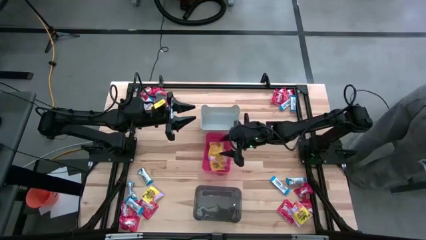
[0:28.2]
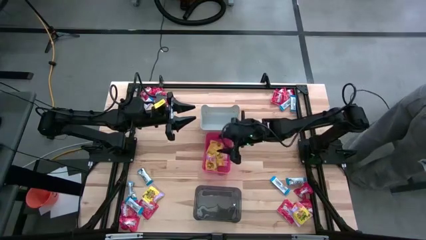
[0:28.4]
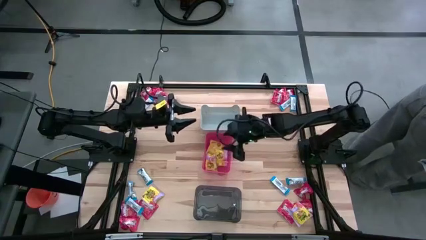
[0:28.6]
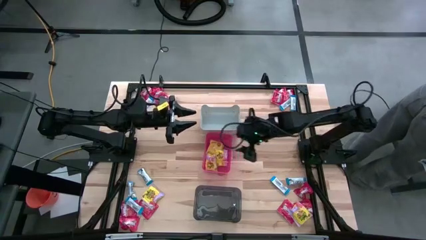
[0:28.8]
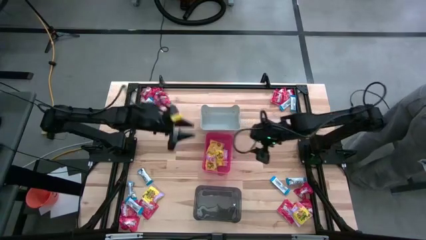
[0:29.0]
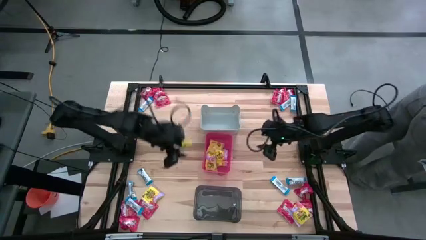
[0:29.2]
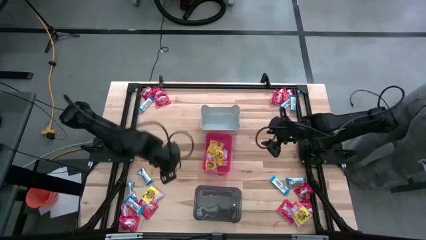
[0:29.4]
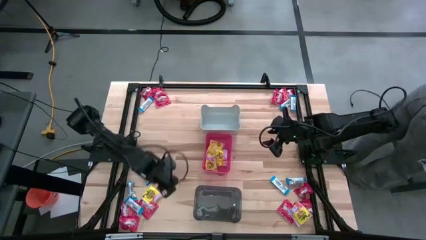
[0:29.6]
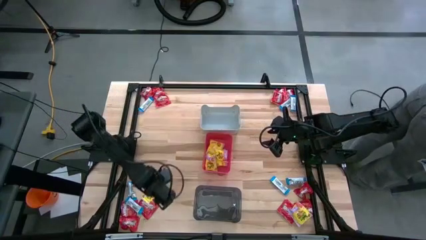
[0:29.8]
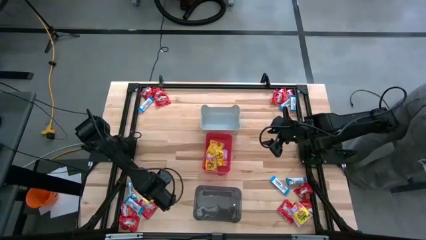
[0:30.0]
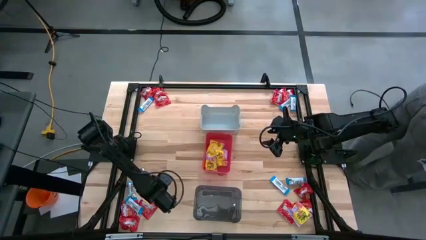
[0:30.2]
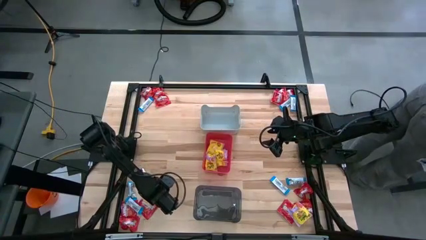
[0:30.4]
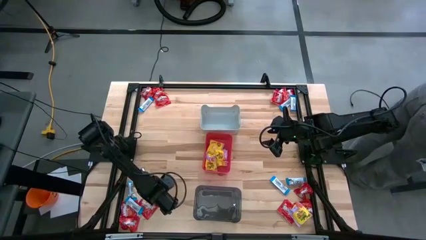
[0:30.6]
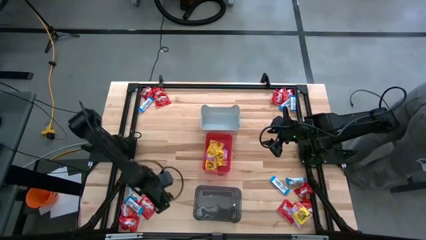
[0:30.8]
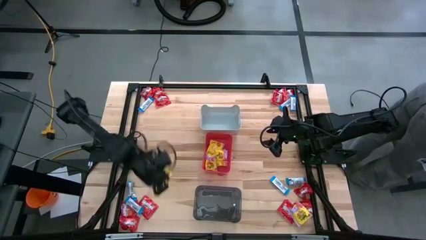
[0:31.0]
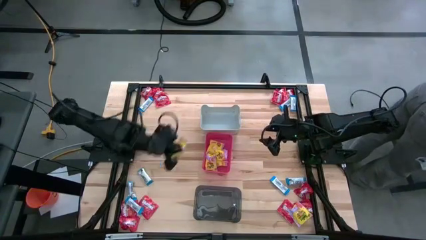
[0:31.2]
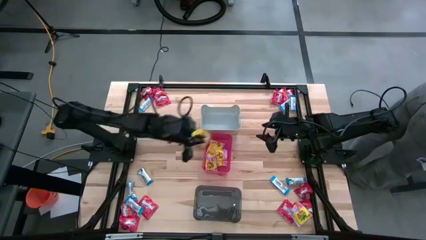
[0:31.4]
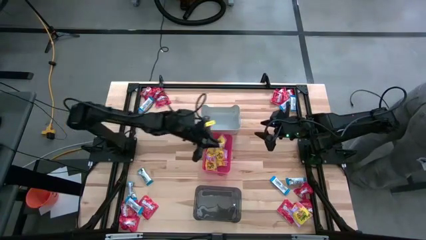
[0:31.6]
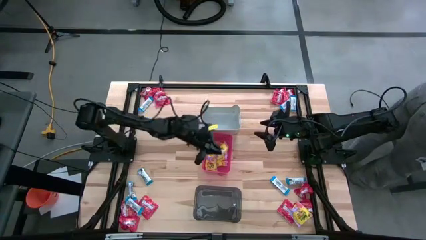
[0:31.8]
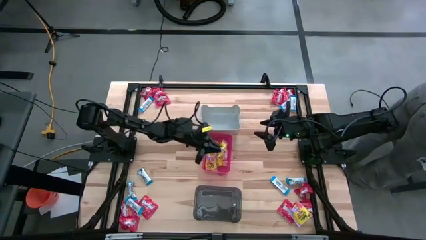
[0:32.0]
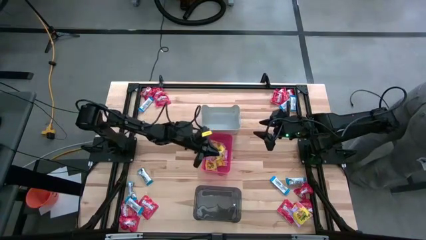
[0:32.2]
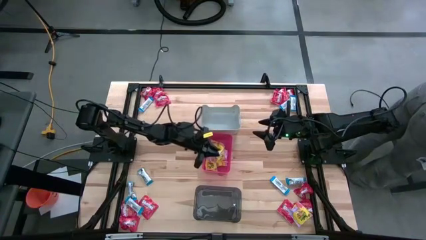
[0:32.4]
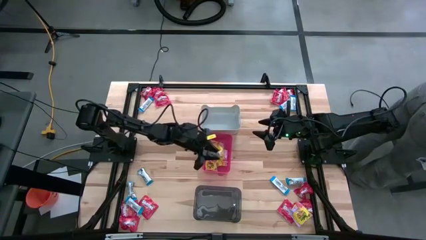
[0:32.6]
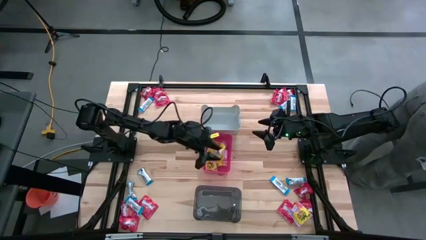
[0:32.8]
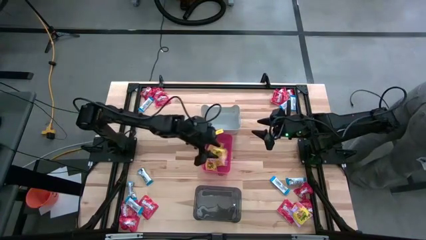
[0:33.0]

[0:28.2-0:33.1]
Task: Sort candy
Put the yellow candy into the red bin

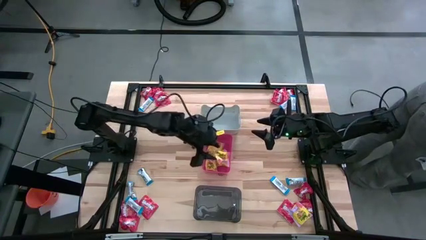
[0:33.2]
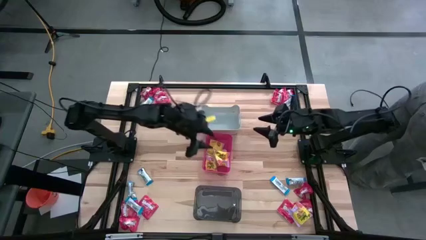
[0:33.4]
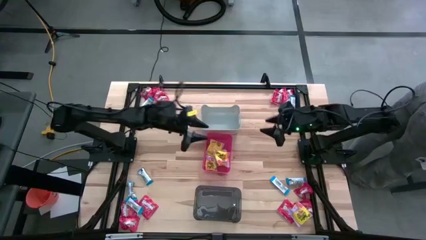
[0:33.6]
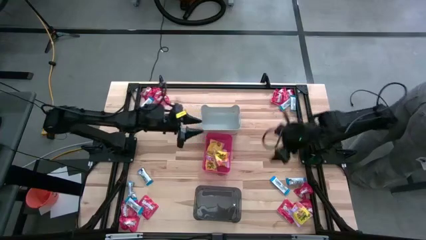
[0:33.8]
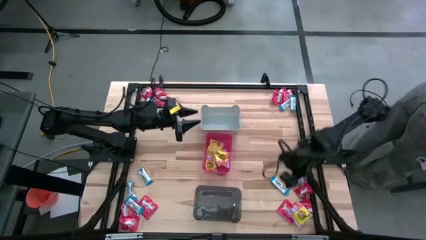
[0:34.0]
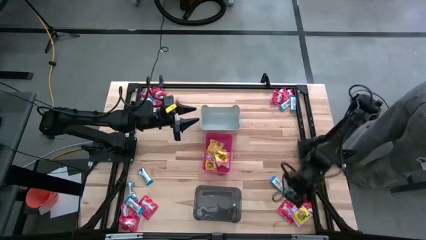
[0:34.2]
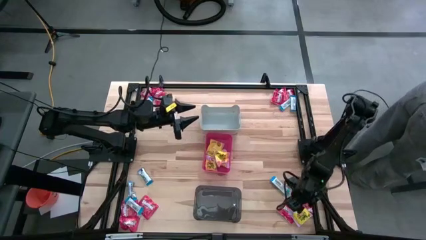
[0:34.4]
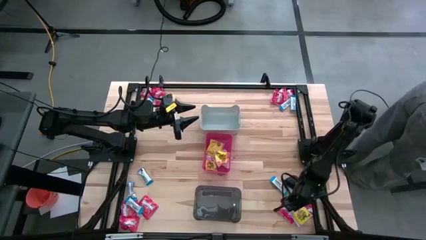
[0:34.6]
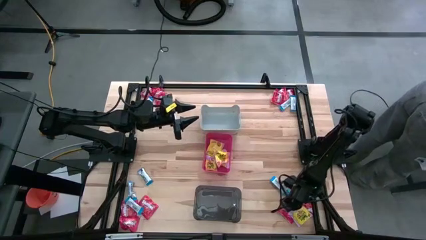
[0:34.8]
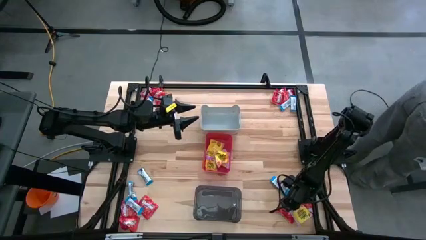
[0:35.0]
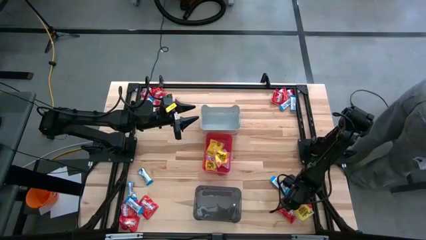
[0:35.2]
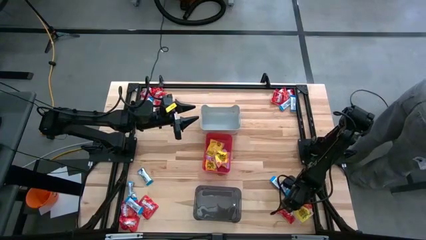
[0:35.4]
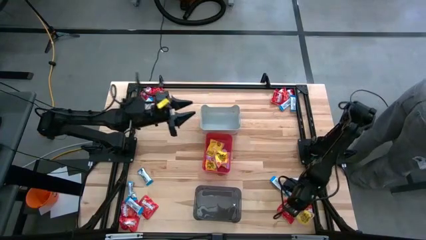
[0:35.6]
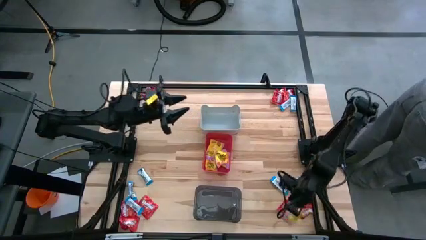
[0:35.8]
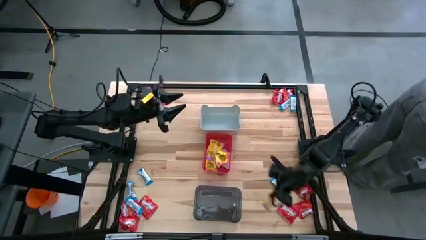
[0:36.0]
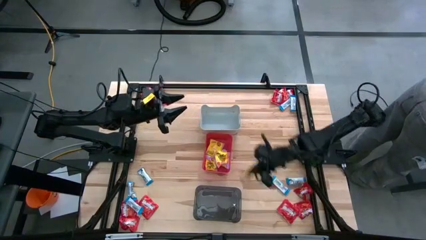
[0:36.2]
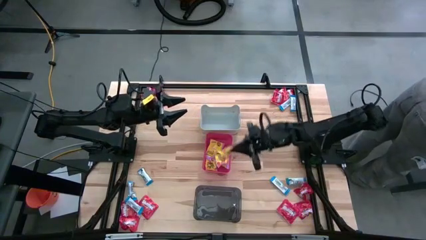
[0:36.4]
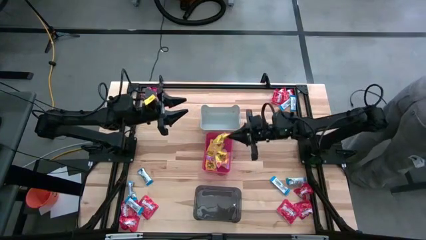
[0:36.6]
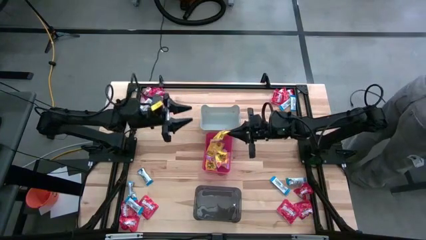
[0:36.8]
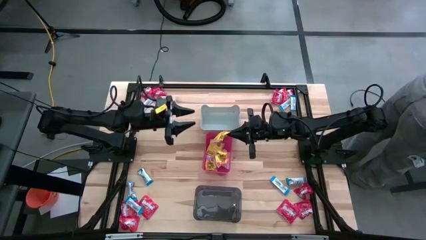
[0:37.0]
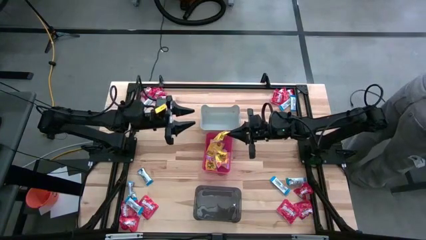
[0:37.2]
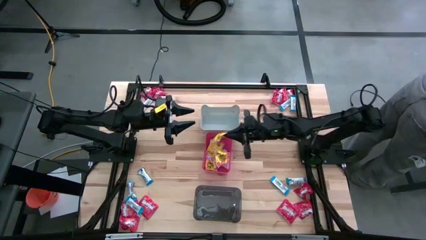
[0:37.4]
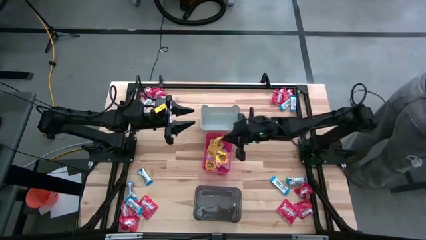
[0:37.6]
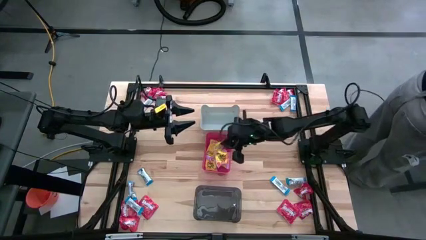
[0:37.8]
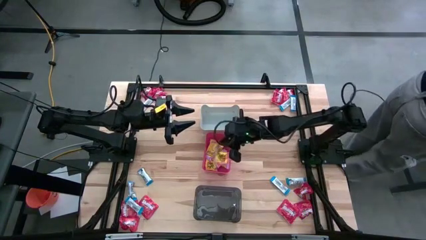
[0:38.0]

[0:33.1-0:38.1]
Put the yellow candy into the red bin

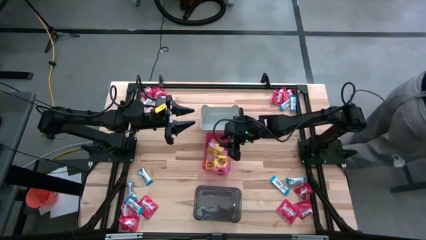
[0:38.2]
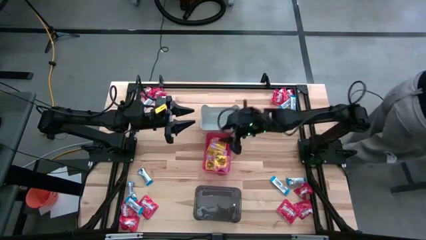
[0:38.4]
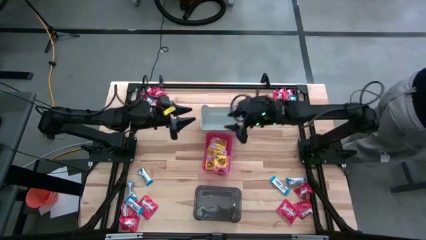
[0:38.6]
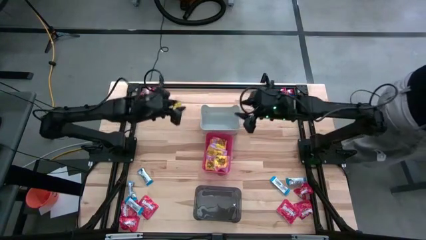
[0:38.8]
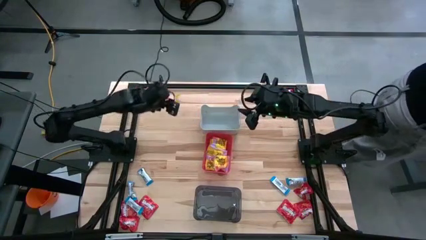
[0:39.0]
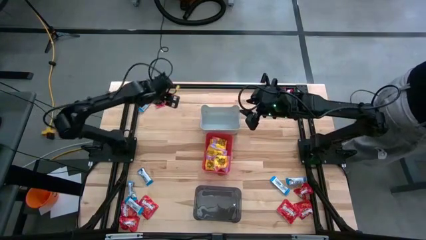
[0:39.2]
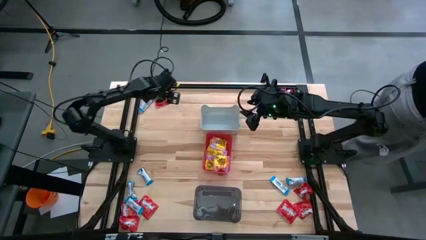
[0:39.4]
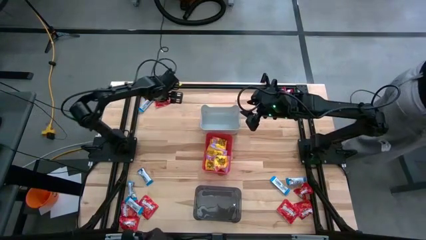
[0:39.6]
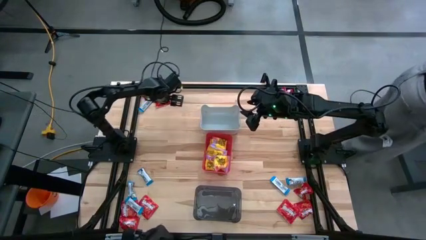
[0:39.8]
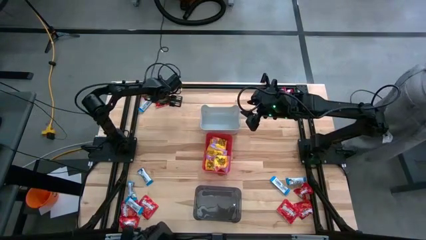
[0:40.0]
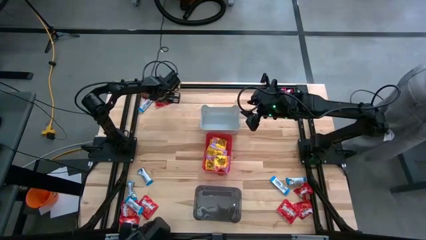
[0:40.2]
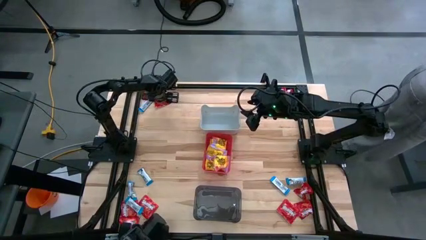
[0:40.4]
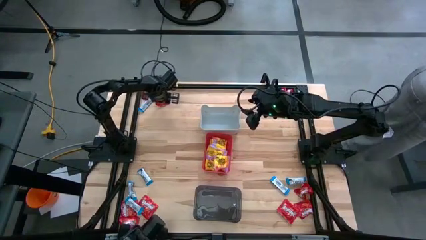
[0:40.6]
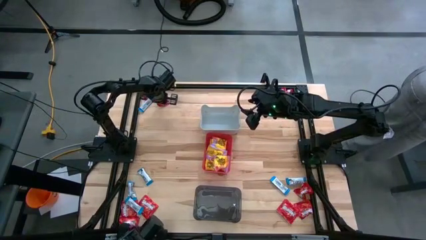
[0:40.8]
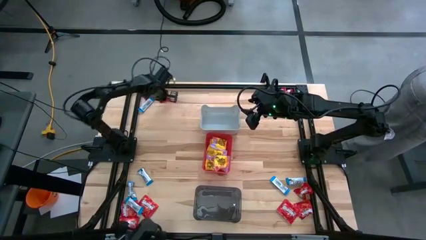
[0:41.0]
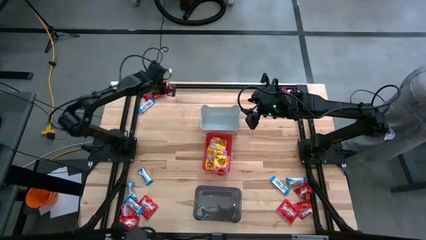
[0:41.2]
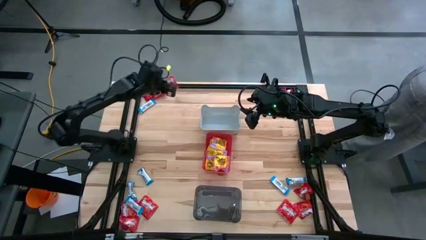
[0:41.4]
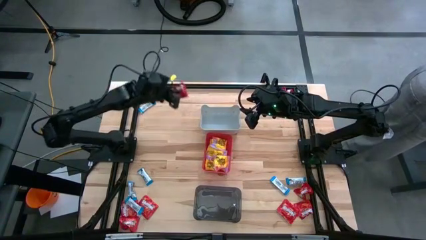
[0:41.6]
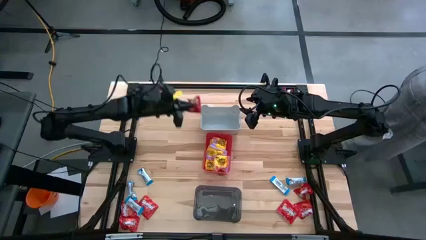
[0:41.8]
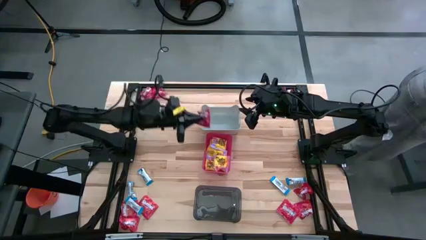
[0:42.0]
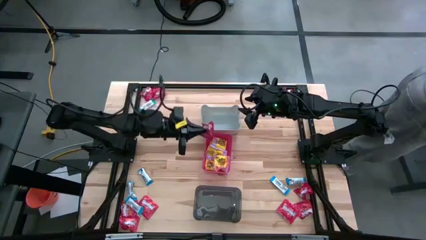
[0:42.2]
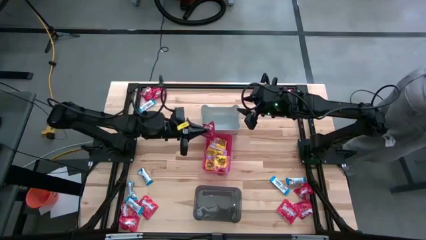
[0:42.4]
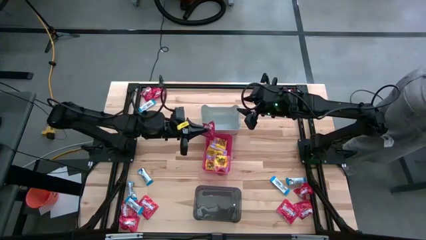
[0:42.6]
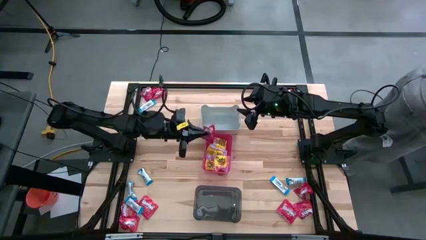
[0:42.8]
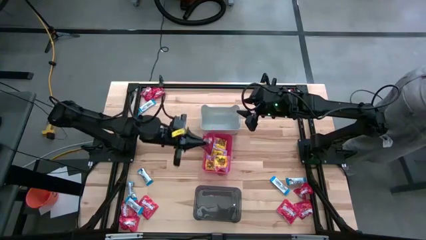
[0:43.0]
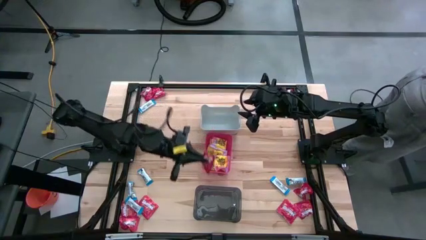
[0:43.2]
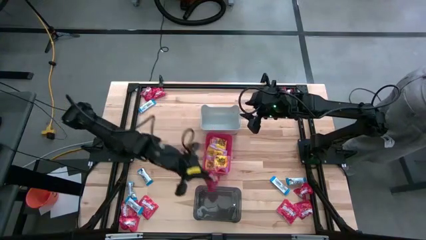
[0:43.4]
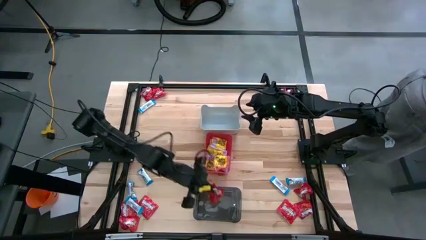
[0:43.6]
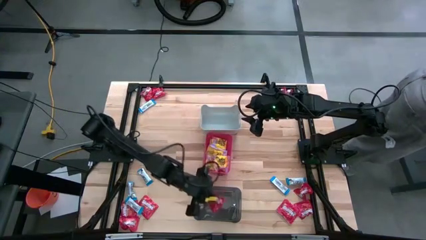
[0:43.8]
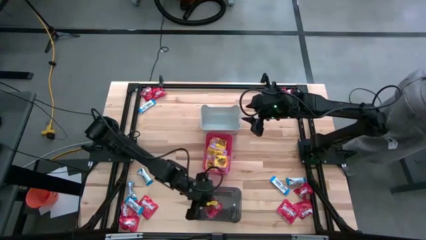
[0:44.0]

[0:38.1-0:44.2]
Put the red candy into the black bin
